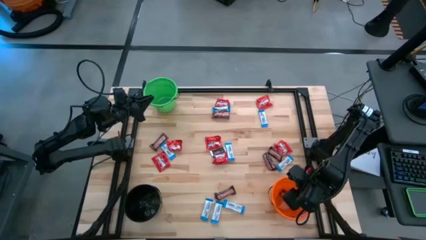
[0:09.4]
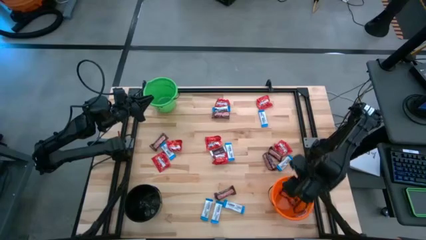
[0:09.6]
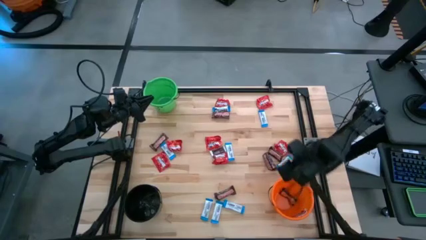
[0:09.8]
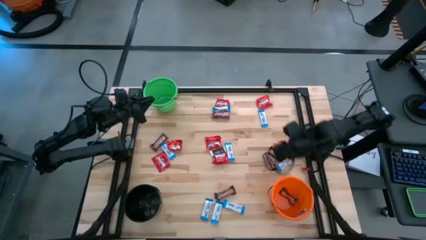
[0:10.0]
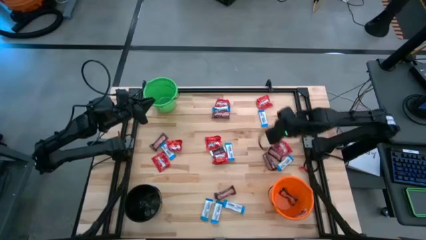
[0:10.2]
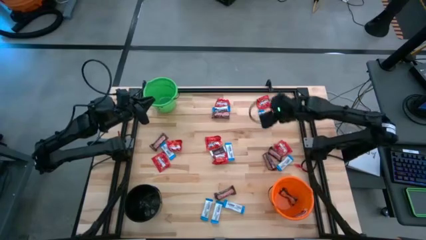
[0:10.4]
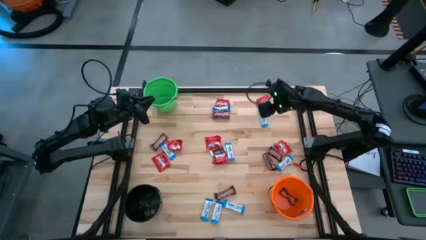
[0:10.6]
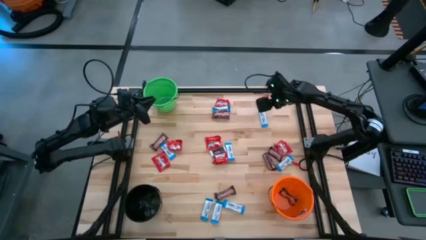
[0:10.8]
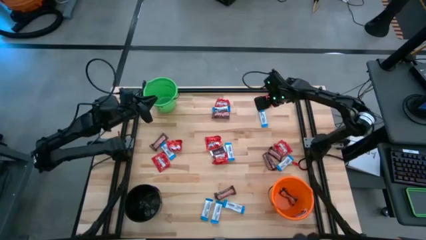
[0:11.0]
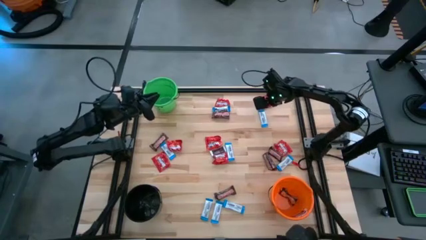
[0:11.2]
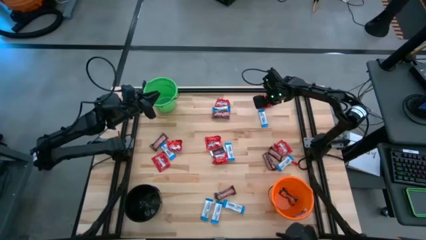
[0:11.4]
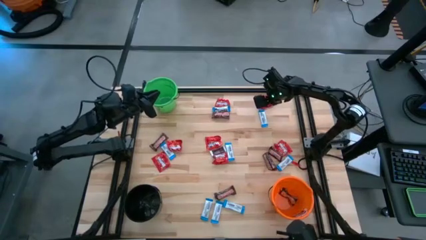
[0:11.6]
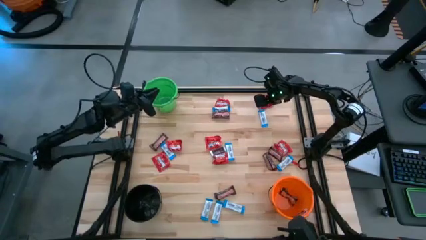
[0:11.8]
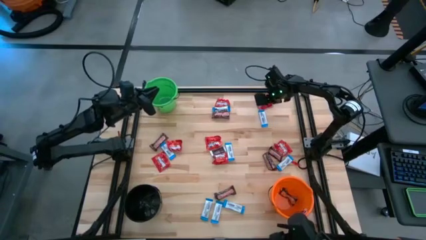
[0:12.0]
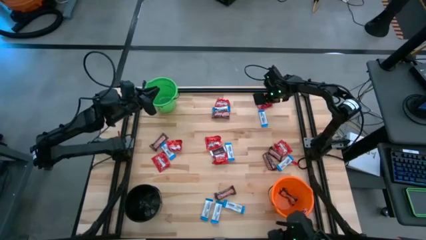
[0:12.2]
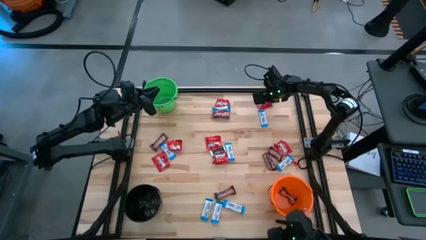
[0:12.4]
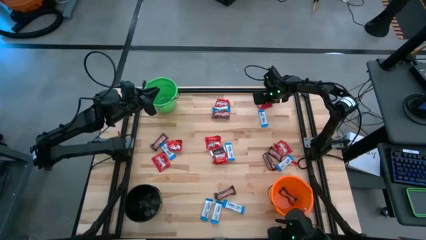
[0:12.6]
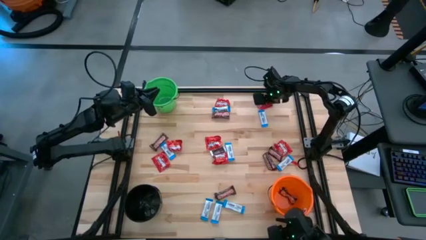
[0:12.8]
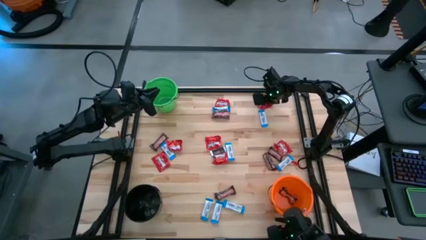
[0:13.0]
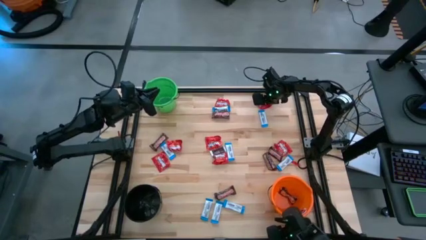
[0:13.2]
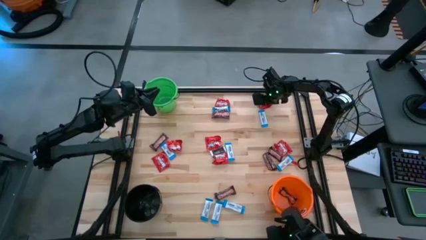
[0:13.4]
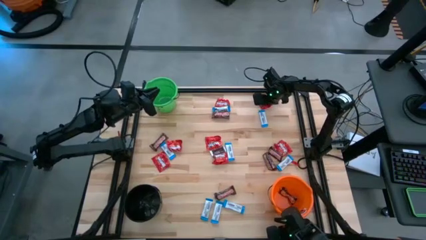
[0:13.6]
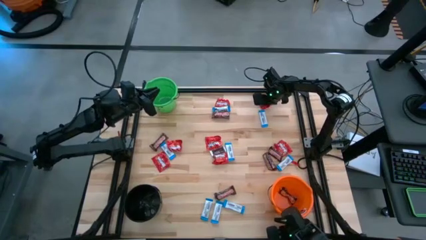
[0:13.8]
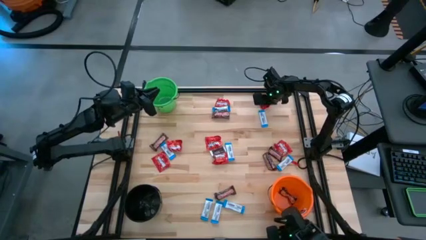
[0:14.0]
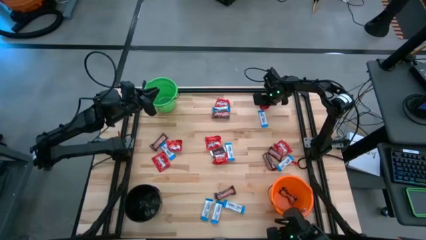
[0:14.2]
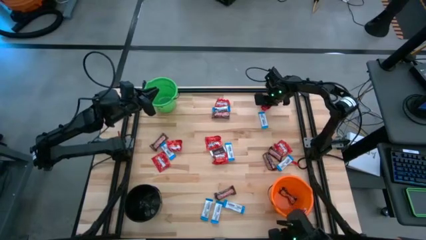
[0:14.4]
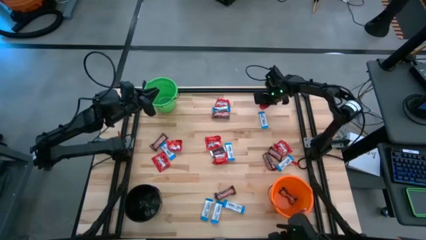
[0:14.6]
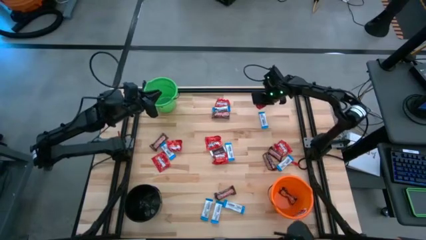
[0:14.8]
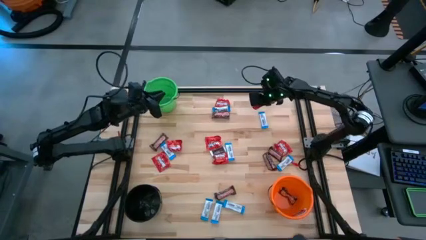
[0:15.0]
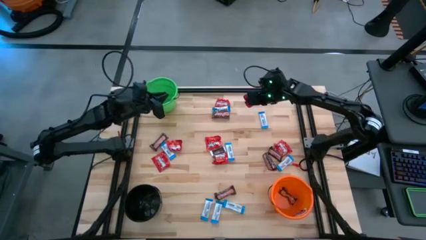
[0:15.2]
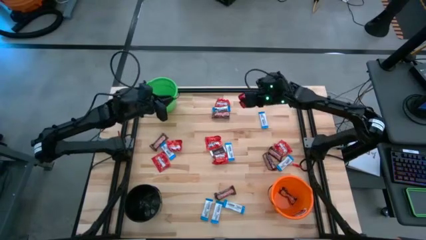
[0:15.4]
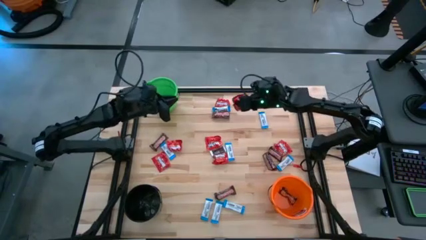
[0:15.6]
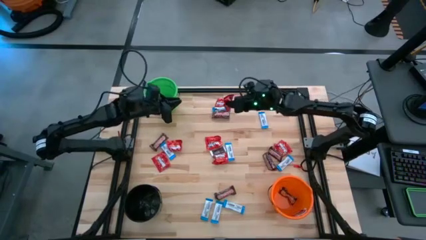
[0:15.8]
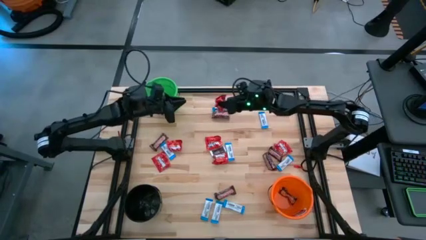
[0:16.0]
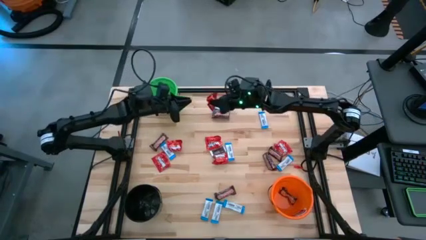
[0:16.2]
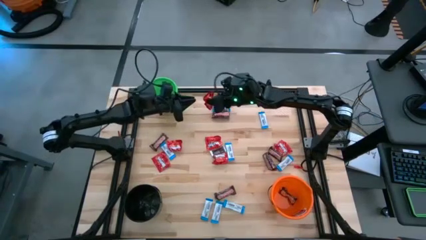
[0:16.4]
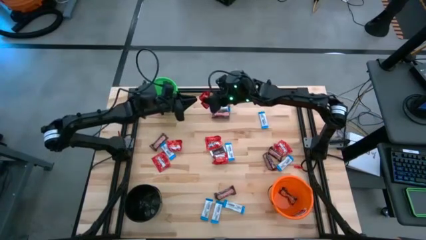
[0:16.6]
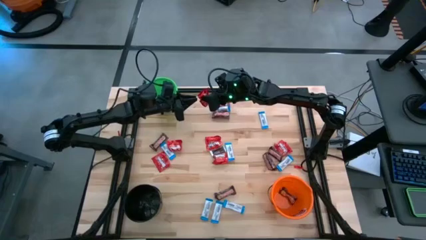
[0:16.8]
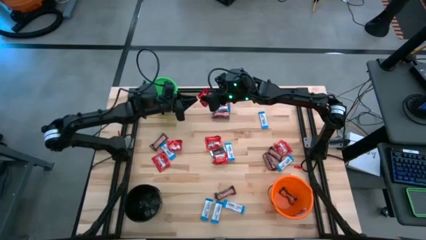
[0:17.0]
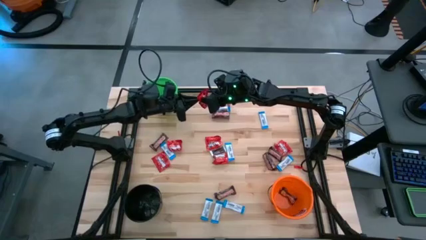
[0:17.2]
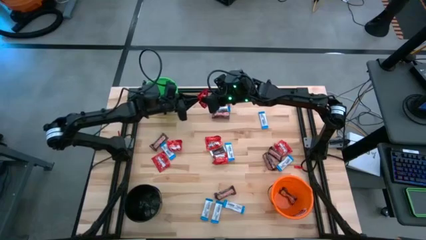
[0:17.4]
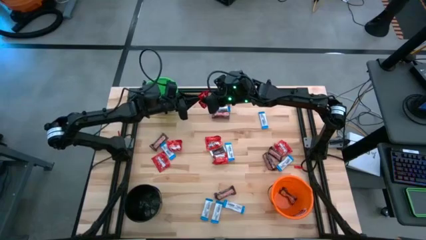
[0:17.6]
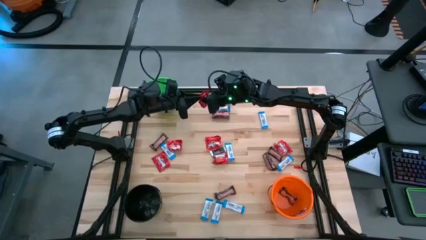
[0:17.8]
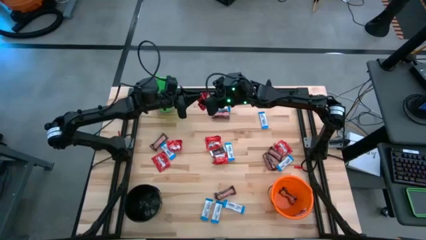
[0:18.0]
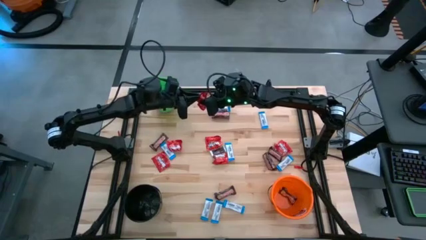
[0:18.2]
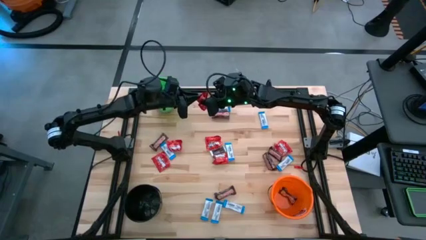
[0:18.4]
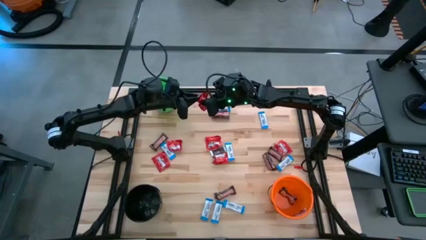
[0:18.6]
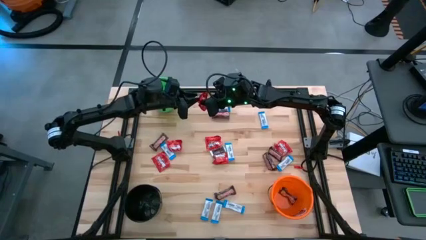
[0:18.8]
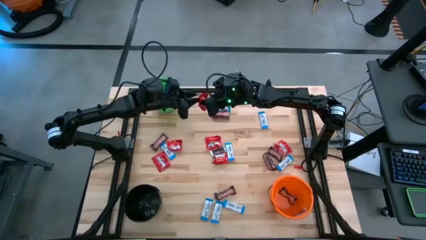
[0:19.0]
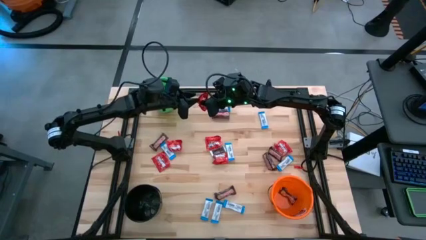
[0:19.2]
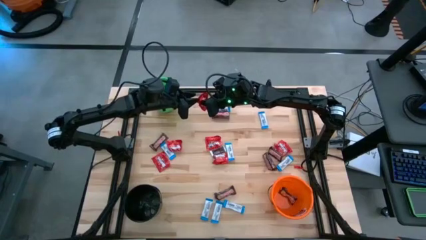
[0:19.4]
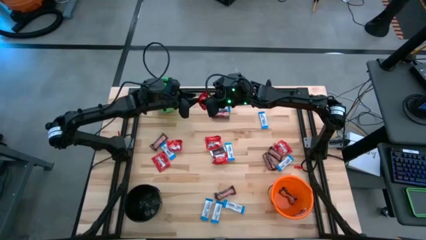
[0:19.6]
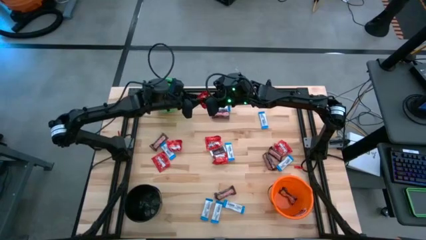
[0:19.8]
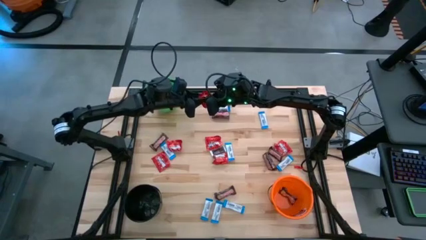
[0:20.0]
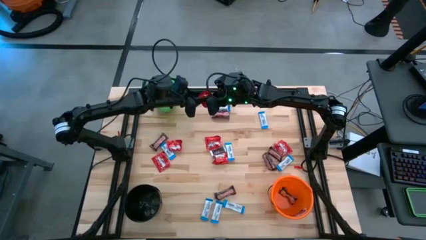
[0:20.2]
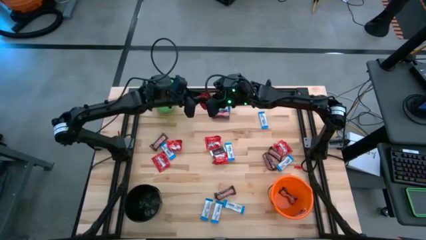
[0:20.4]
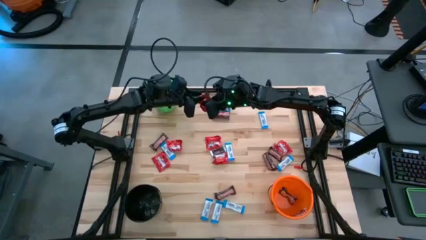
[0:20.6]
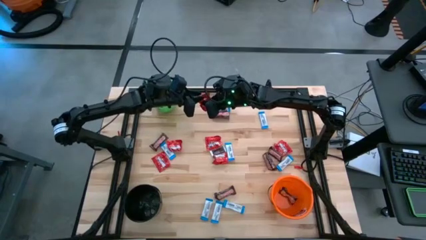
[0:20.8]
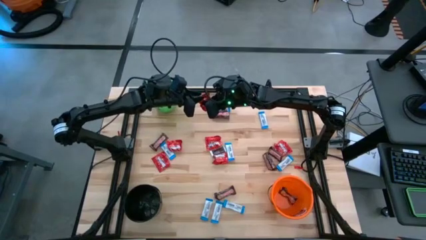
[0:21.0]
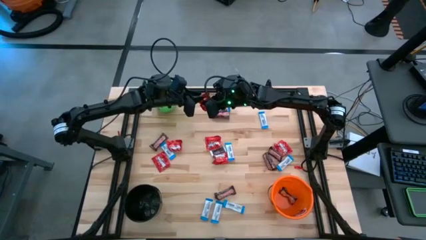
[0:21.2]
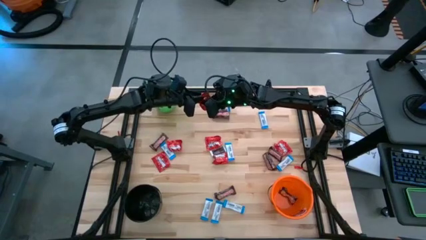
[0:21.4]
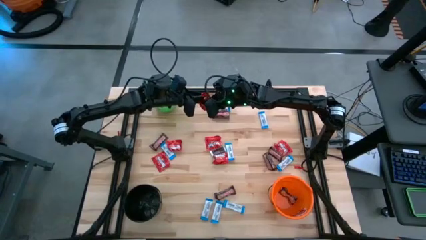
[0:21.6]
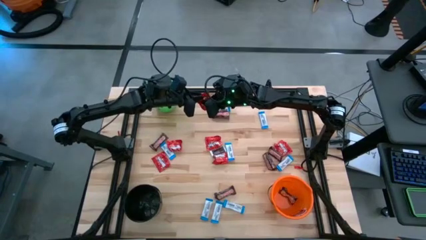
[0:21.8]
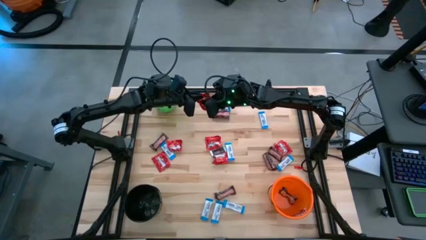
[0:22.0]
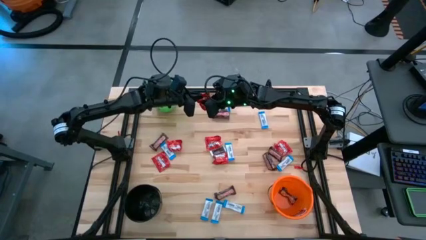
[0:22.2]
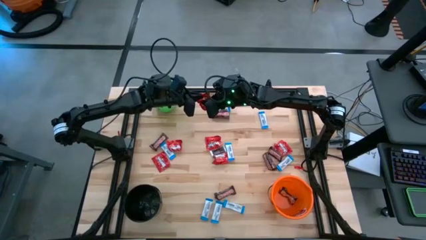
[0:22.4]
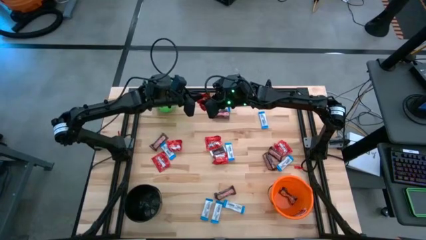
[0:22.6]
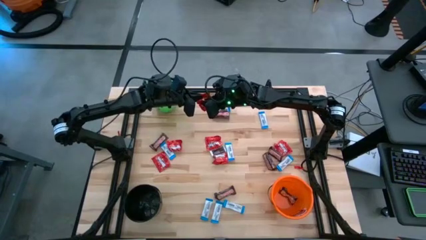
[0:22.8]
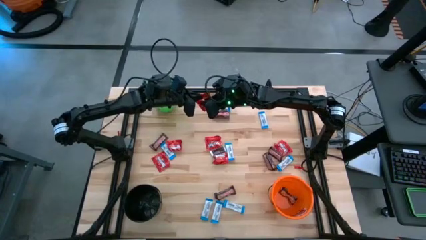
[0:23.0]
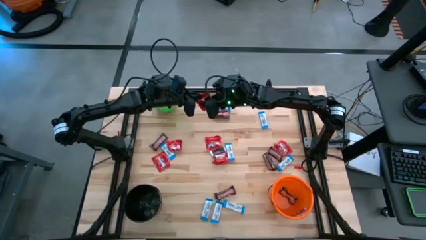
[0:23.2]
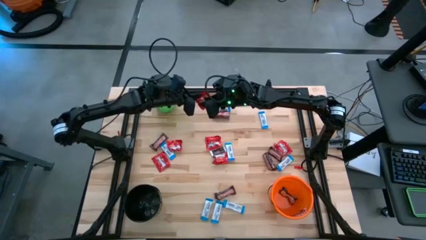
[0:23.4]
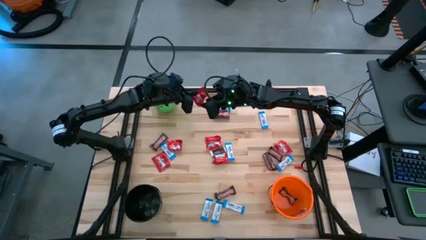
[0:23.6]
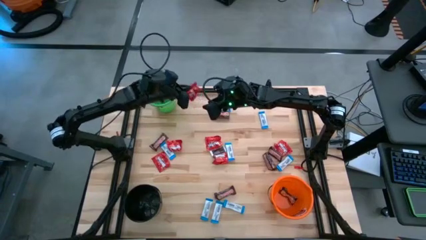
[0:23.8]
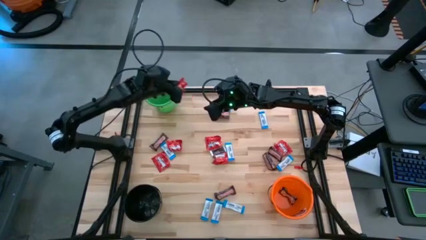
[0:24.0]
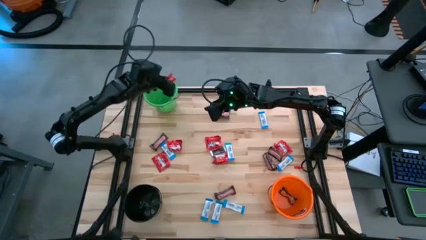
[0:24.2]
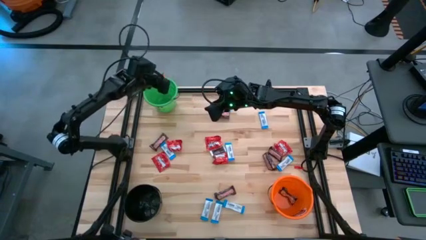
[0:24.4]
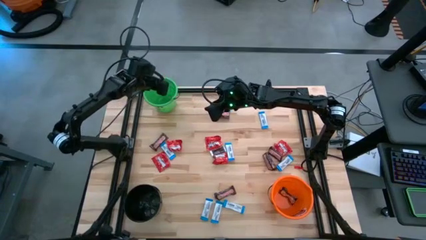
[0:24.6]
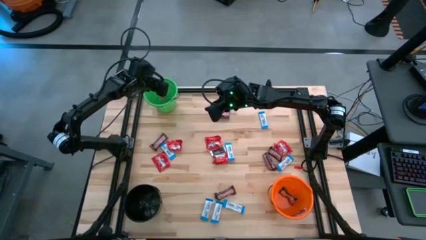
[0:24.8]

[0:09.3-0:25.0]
Task: Sort candy
Put the red candy into the green bucket
